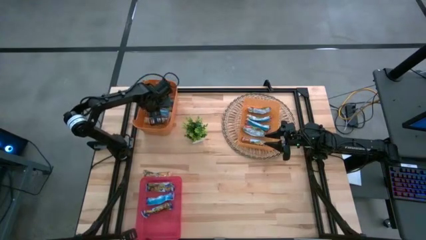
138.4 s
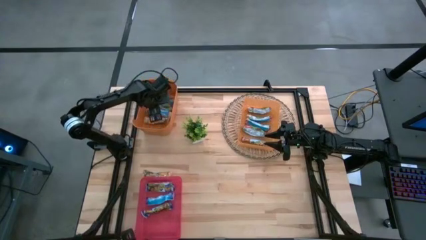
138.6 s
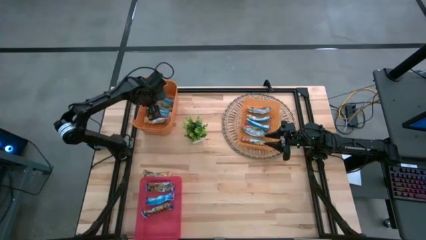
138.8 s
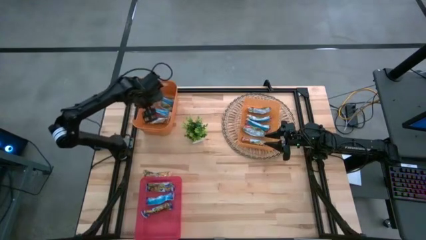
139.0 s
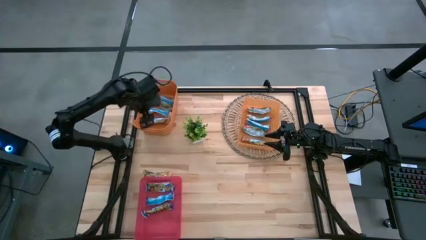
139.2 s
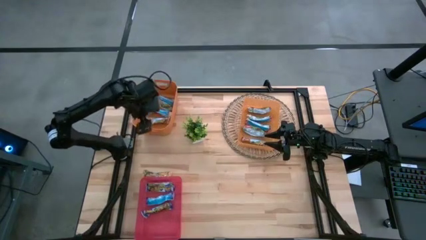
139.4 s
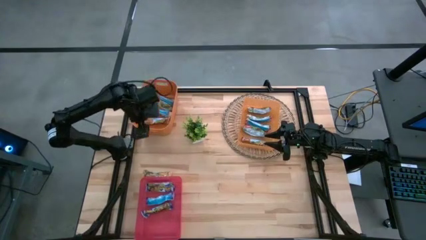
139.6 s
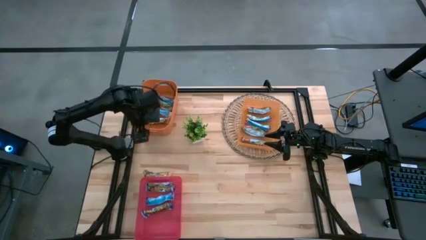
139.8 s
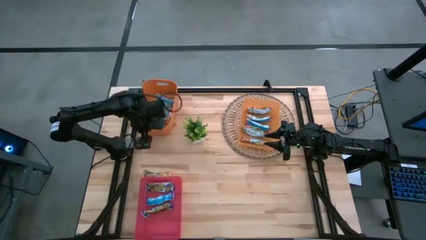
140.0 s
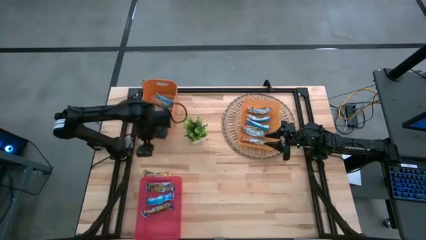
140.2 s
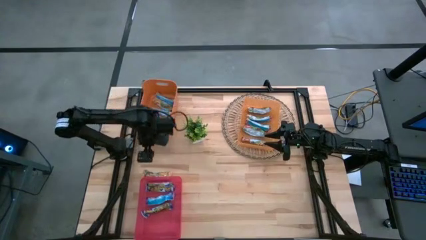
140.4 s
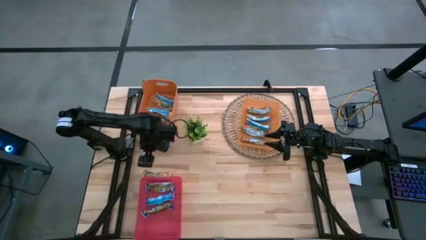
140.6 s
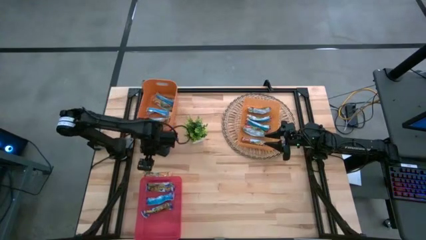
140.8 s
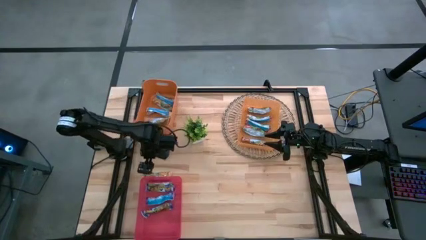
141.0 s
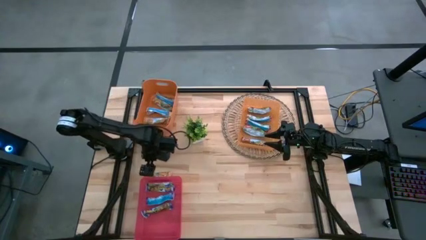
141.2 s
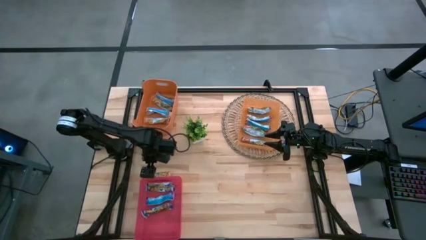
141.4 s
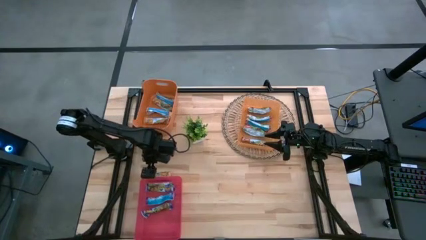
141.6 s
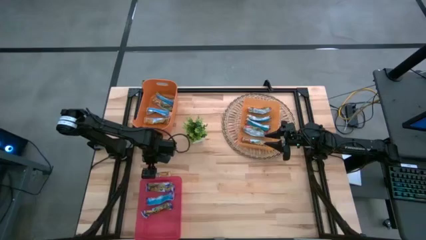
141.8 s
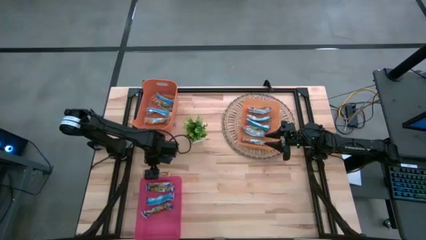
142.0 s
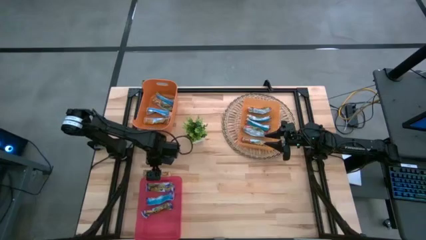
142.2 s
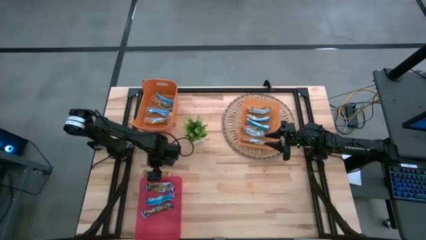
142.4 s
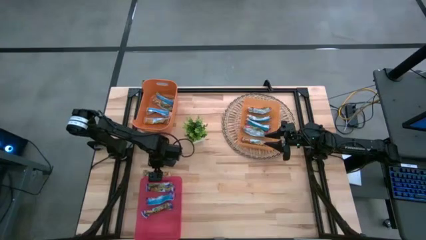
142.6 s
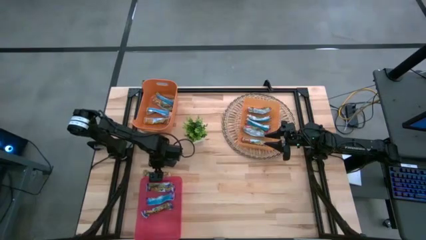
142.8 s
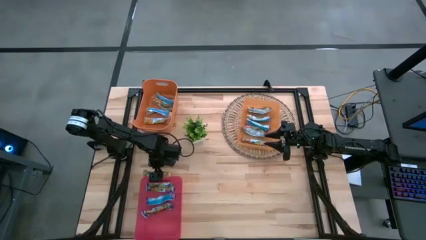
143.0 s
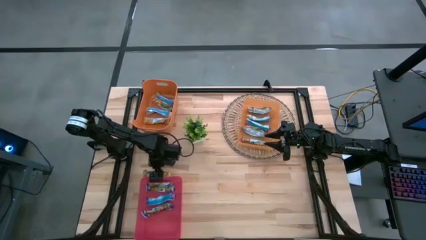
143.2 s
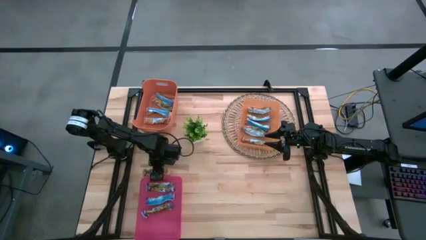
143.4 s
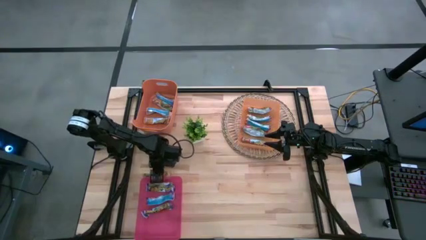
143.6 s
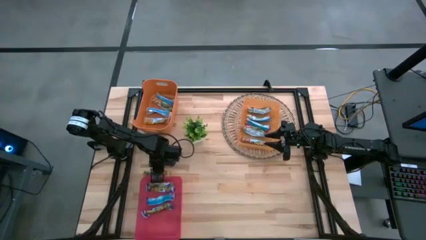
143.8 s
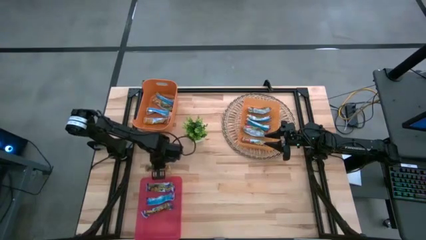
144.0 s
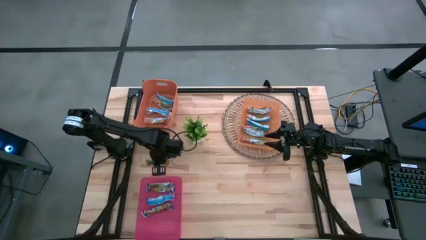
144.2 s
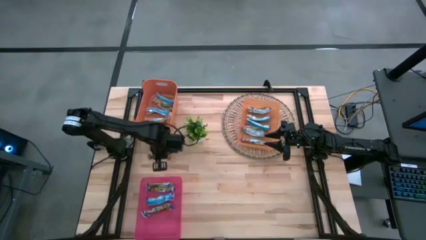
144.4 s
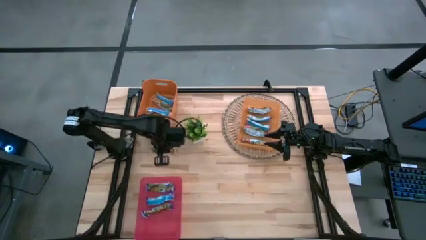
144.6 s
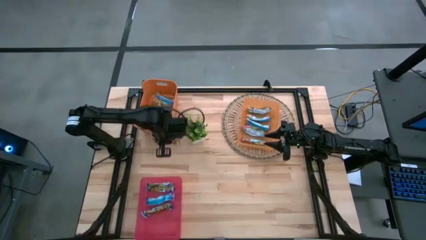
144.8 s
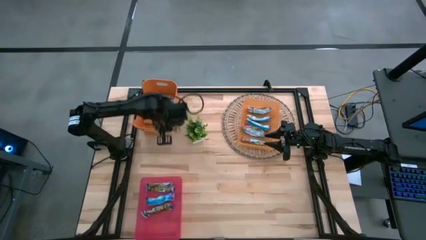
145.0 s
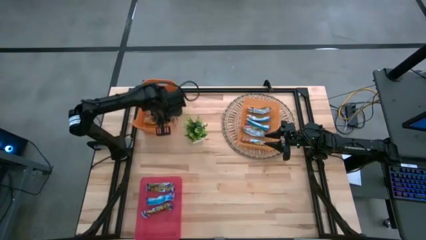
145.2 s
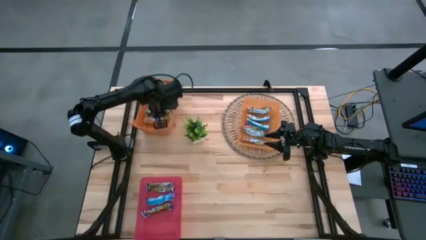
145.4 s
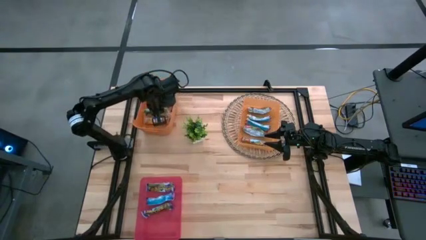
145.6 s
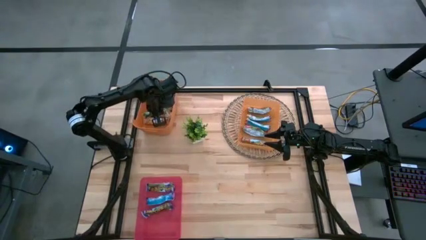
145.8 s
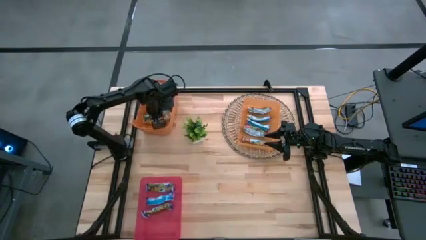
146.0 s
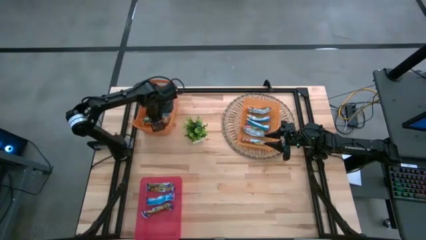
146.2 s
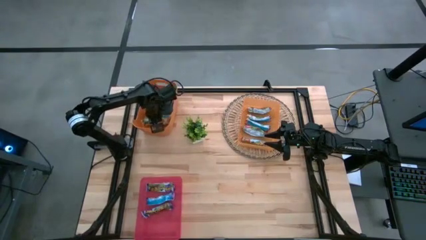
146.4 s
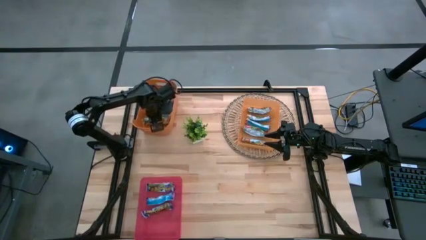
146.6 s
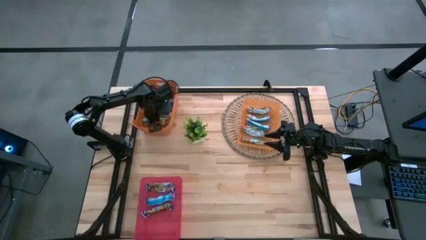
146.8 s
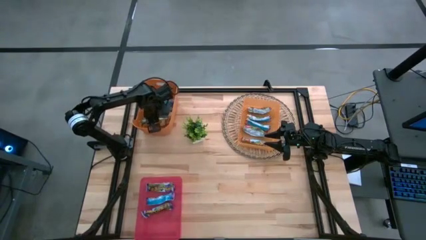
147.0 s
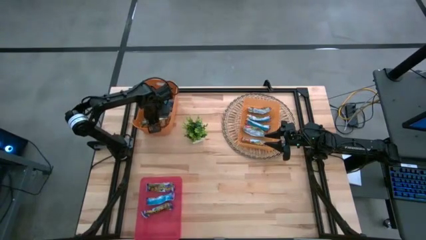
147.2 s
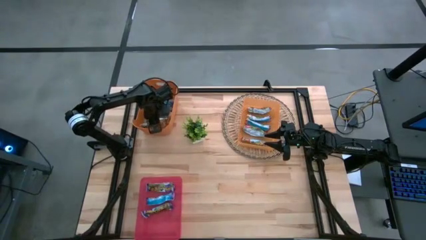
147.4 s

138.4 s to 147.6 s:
Task: Pick and place Granola Bars by type
Put the yellow granola bar into the left orange bin

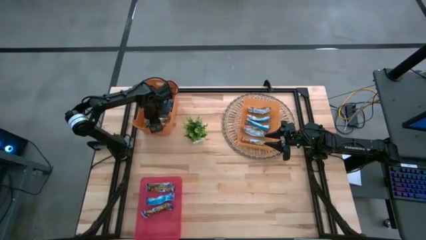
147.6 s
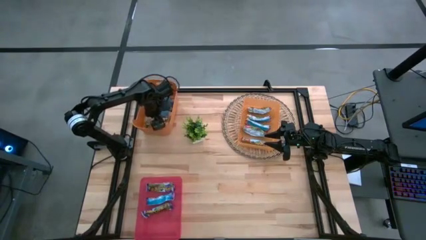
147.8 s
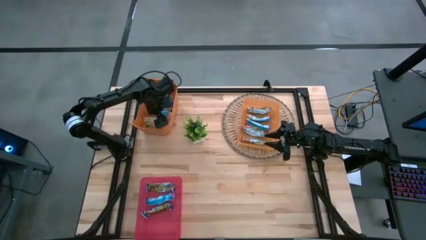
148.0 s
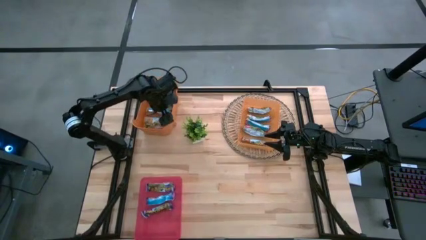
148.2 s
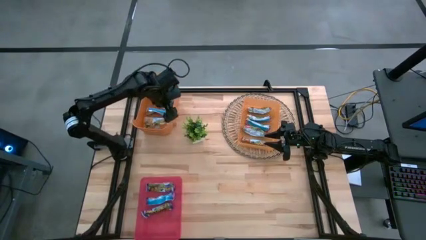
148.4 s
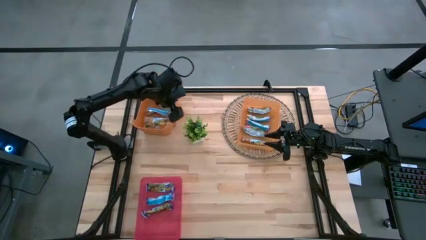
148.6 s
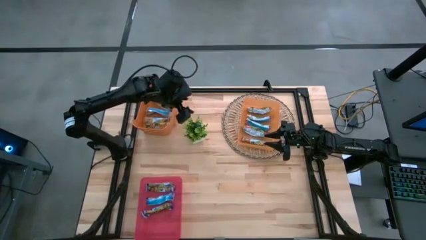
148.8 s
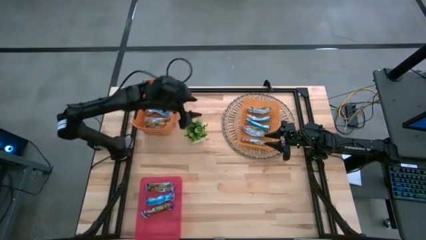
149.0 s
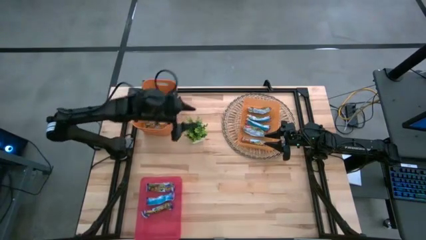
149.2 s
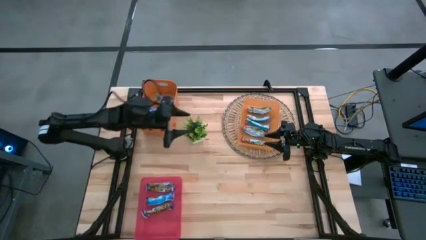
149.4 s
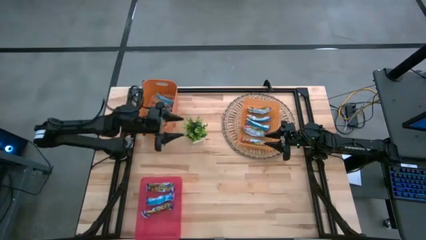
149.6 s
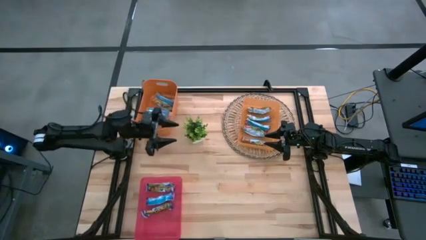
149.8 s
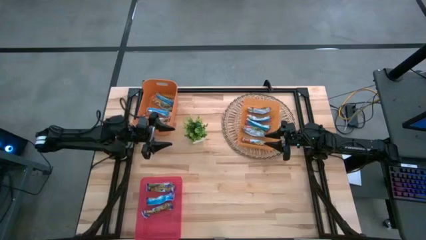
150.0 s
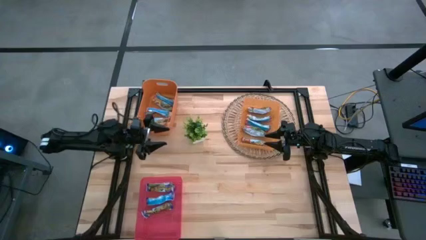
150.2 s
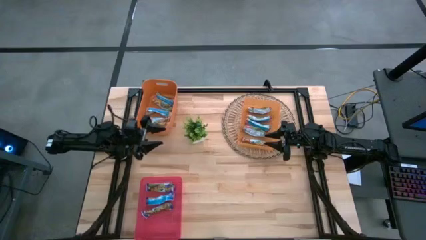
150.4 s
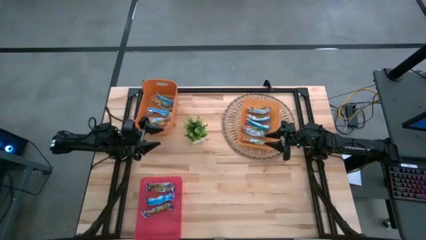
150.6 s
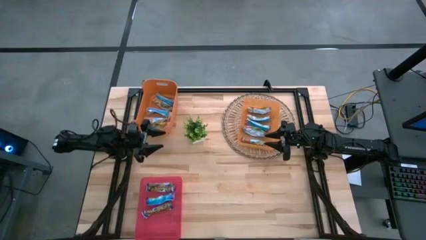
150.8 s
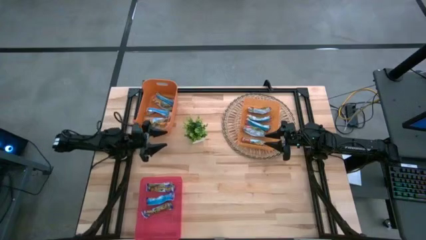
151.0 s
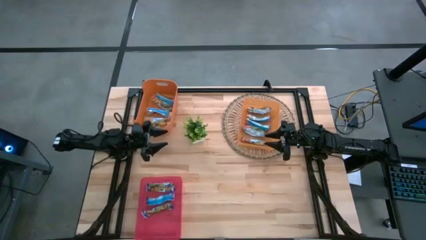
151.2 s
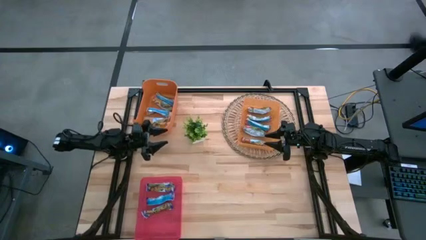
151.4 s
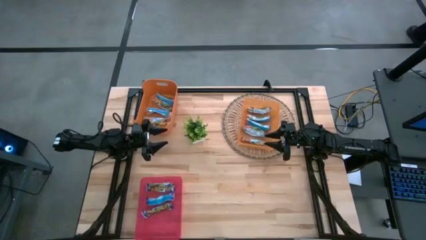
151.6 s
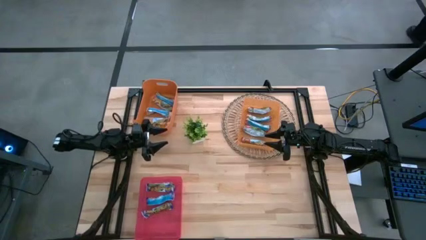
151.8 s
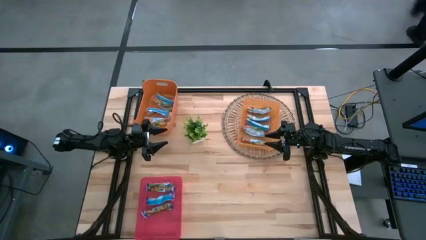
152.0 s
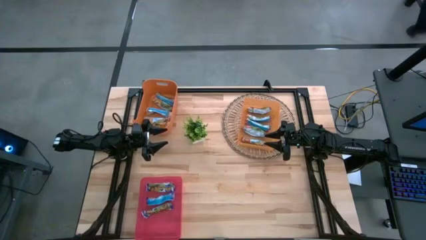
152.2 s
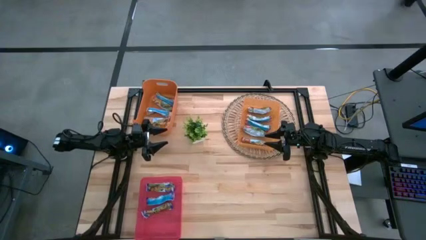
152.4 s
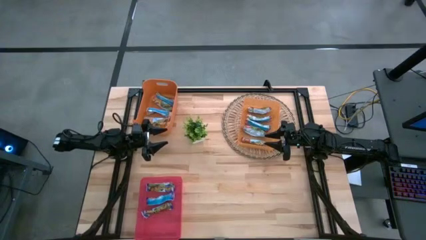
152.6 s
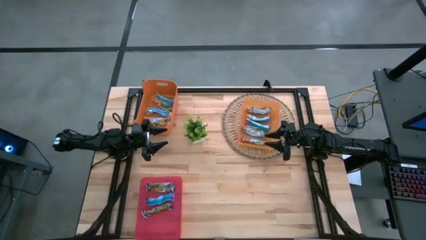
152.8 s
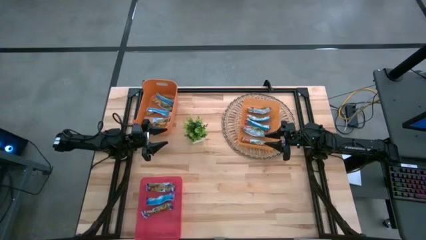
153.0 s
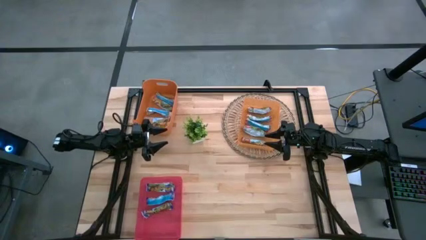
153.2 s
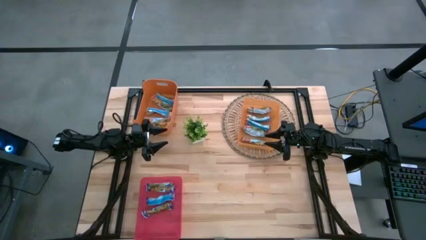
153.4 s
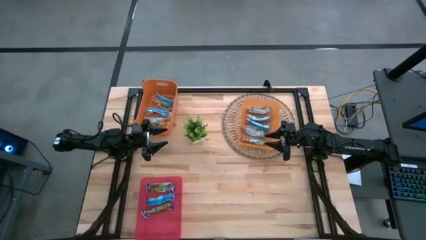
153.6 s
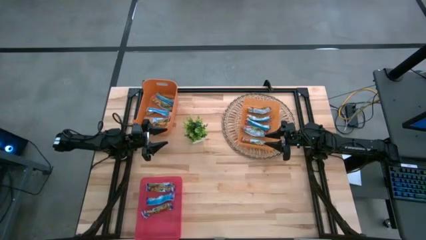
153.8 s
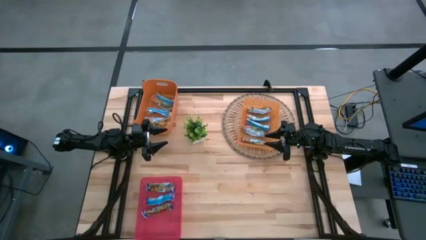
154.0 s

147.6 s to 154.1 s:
Return to Home Position
